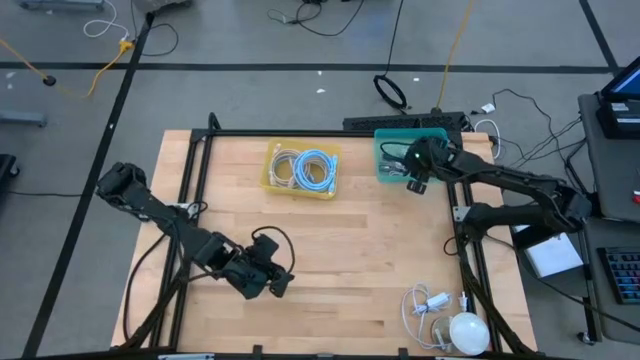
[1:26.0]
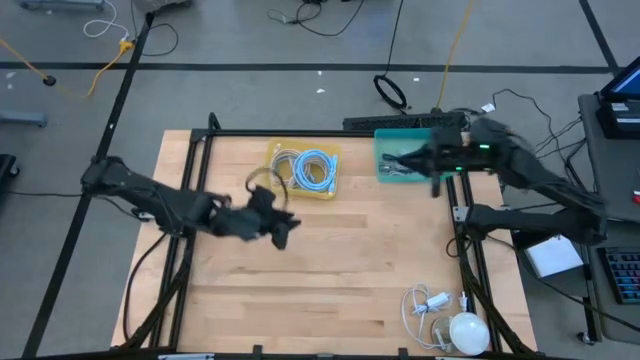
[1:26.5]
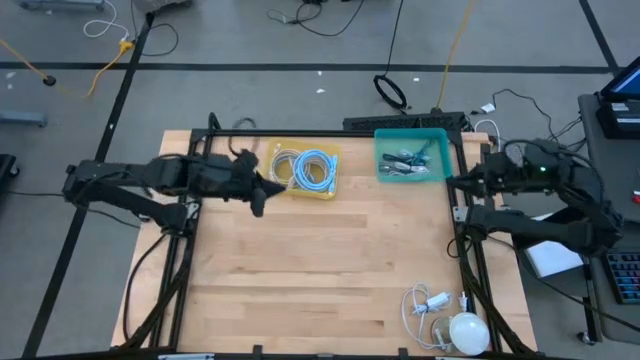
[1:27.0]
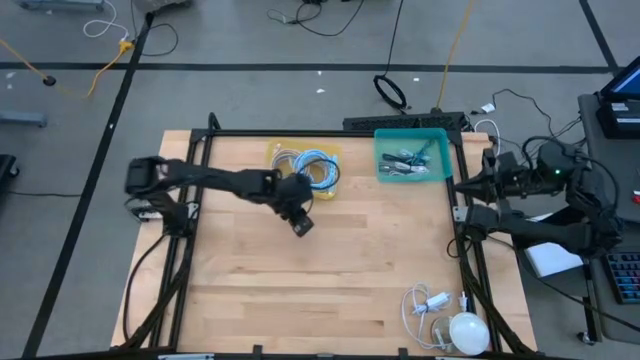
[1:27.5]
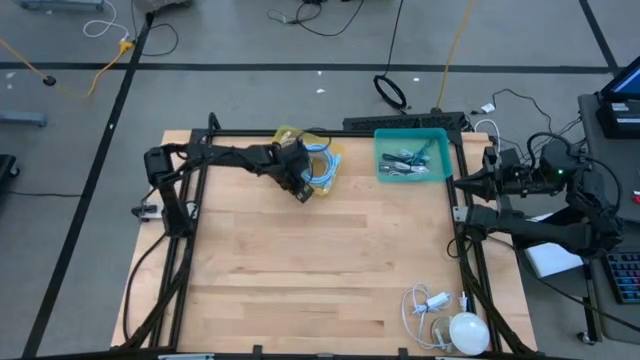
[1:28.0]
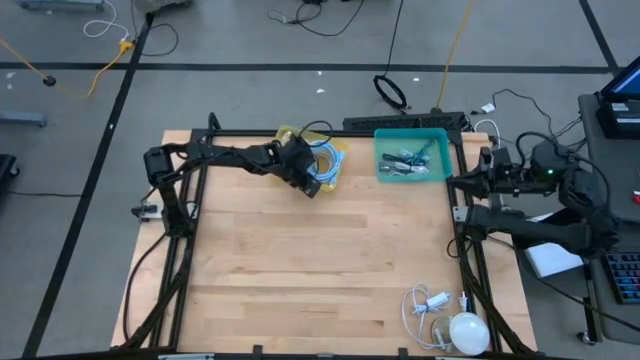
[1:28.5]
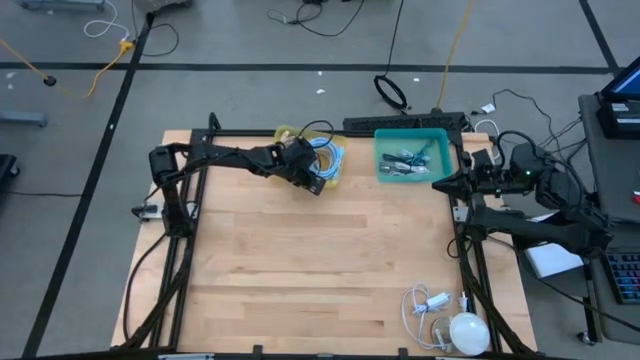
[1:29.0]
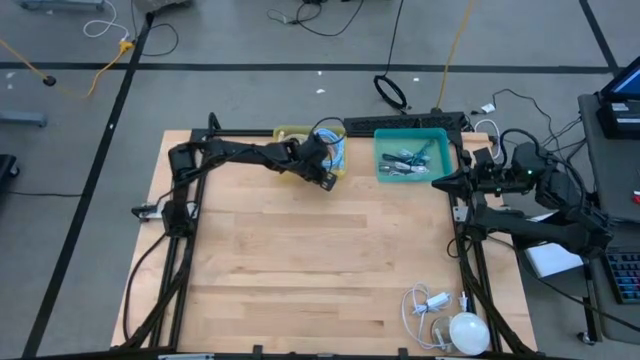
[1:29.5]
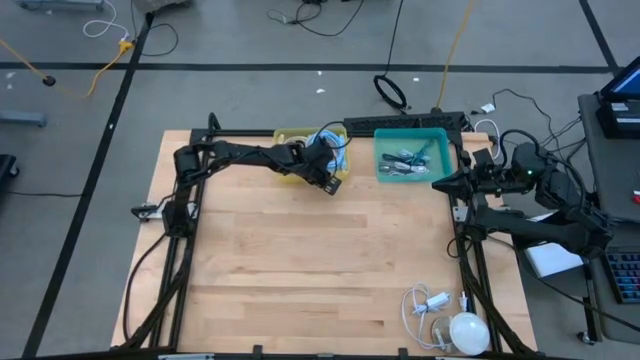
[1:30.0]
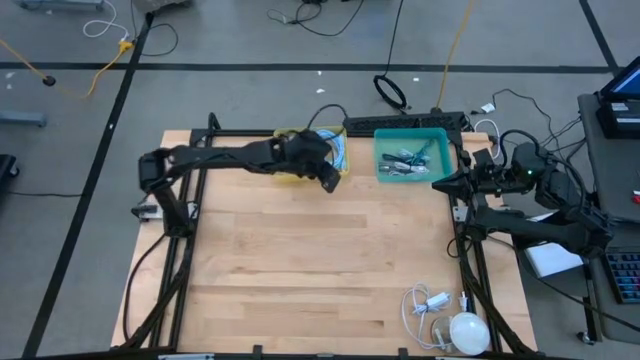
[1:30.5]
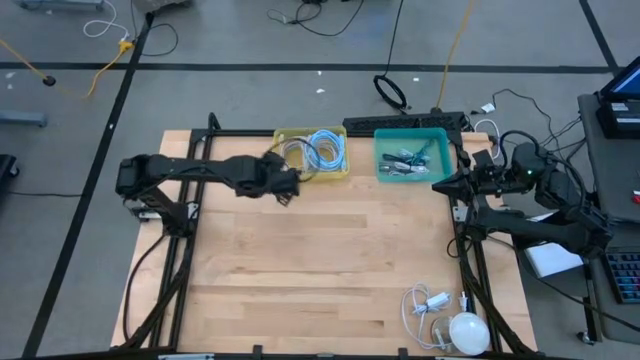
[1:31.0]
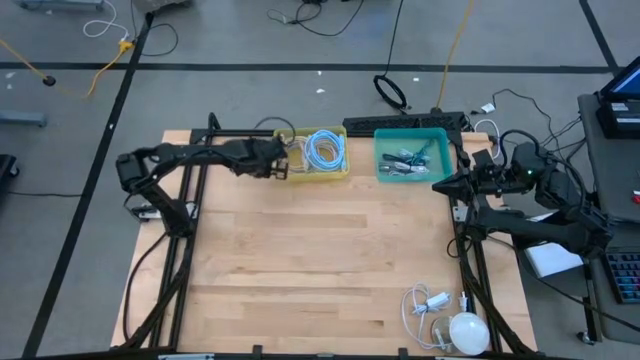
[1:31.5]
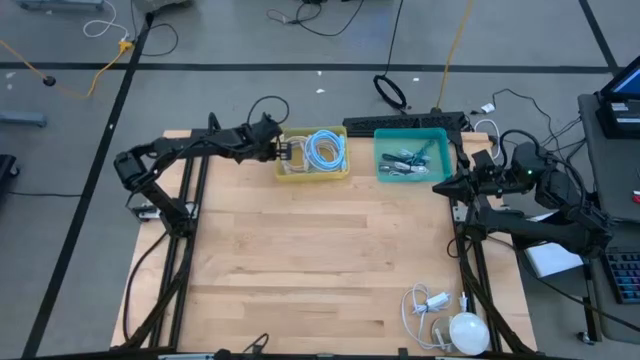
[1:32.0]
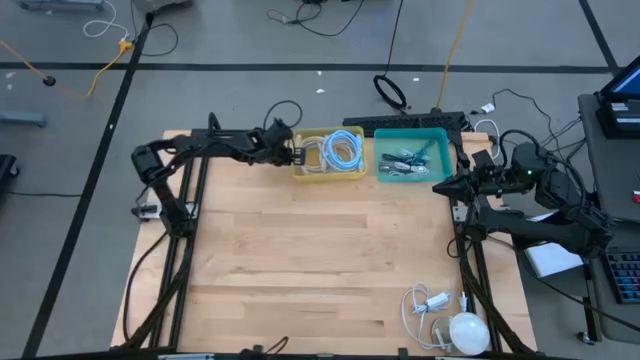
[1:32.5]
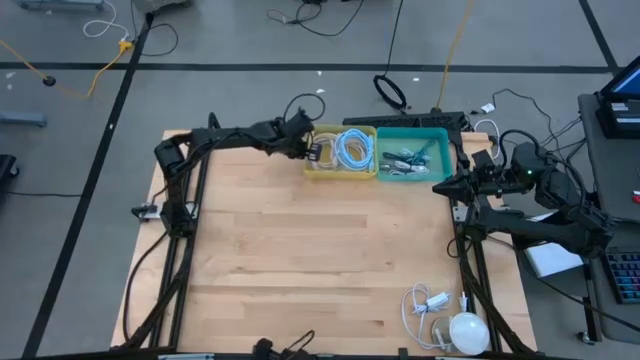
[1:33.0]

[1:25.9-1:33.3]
Task: Pick & Place USB Port
Adjust the yellow bin

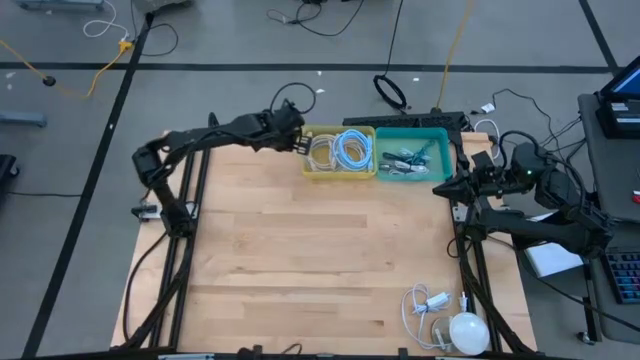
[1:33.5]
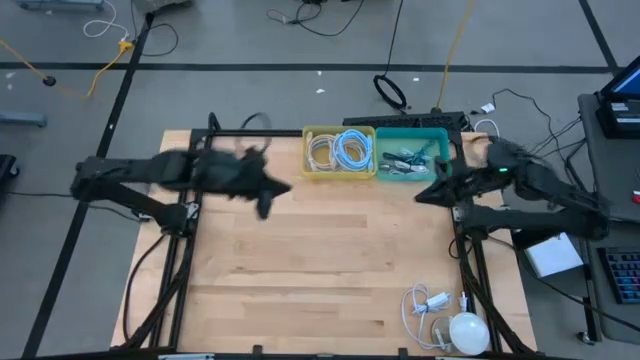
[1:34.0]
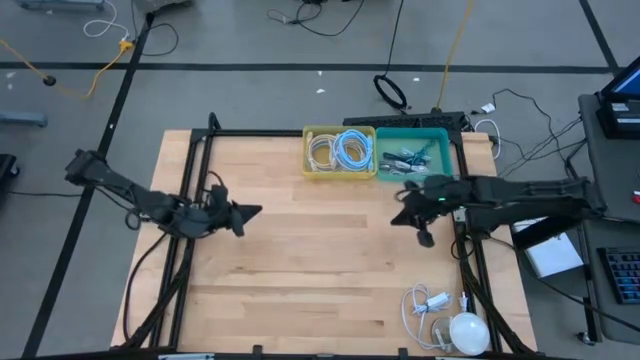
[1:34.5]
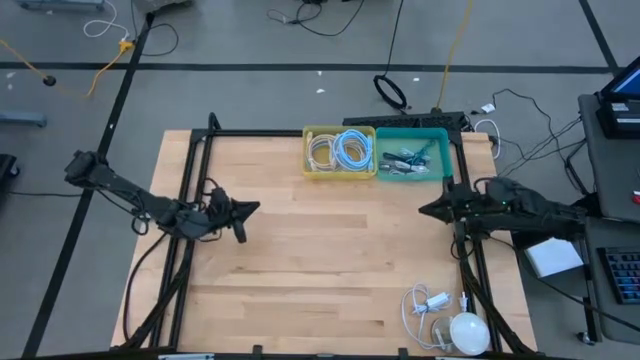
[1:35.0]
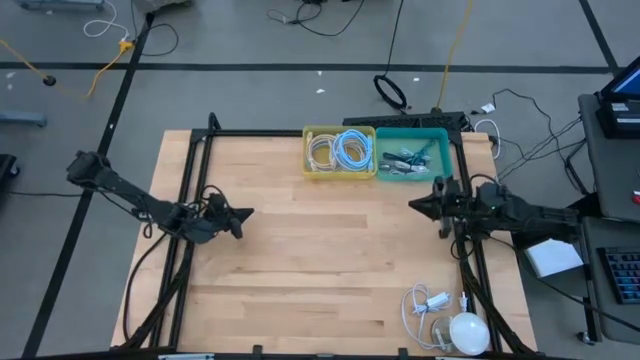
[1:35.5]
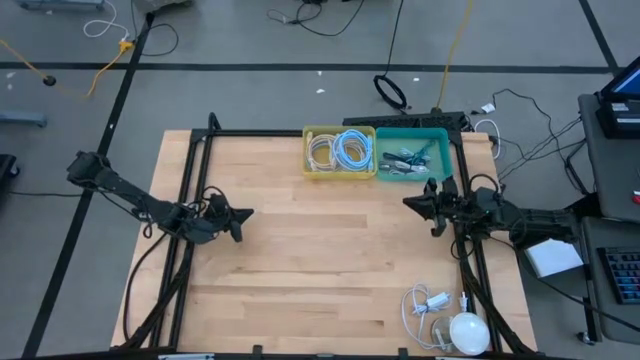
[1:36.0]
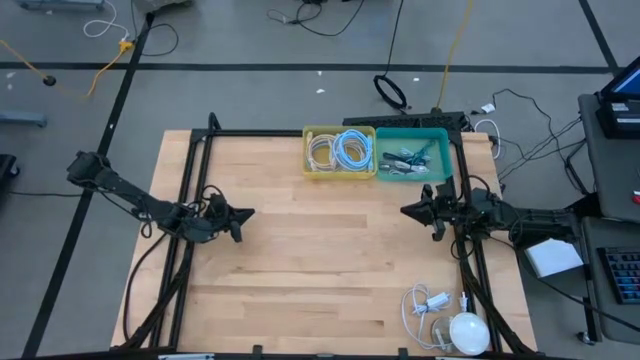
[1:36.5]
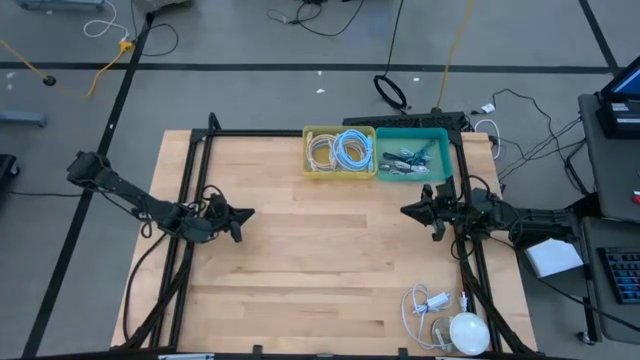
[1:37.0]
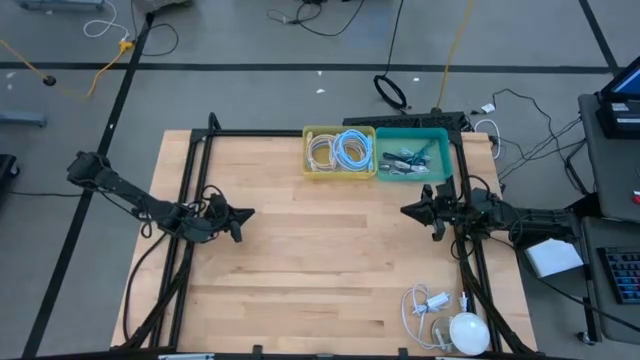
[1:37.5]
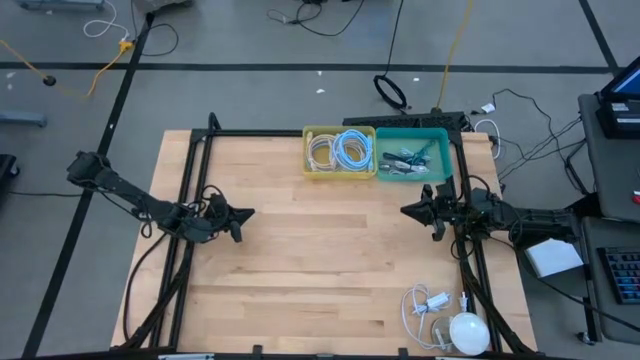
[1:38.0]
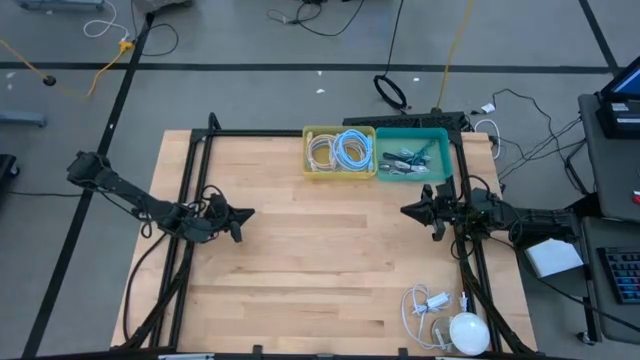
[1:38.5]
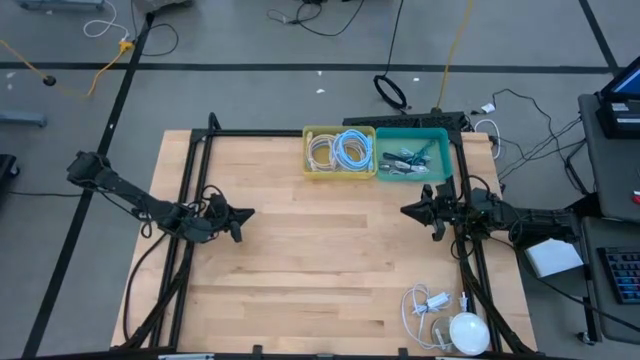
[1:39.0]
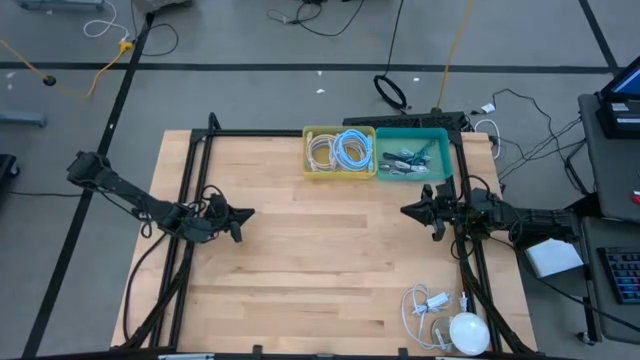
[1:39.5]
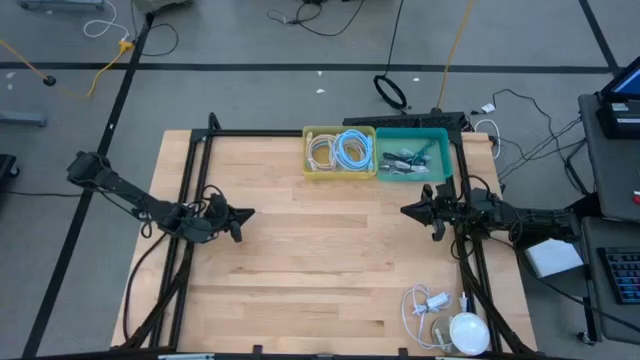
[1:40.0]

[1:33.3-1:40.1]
Return to Home Position

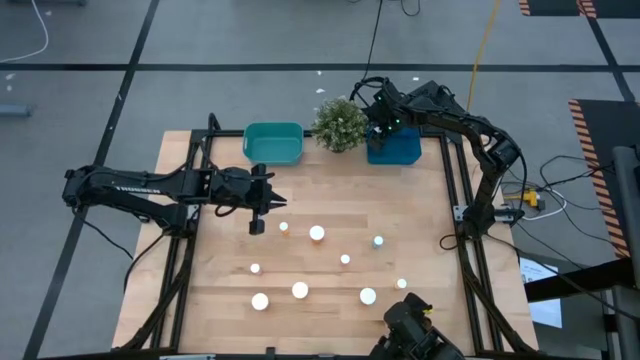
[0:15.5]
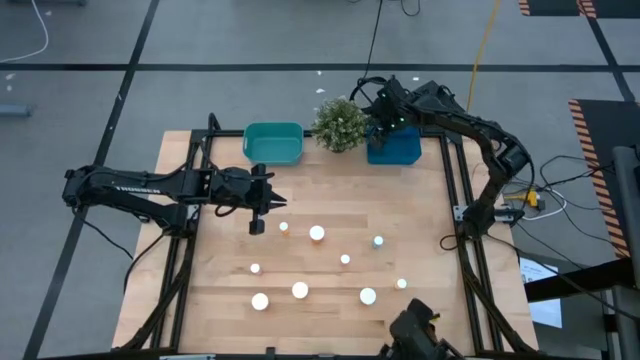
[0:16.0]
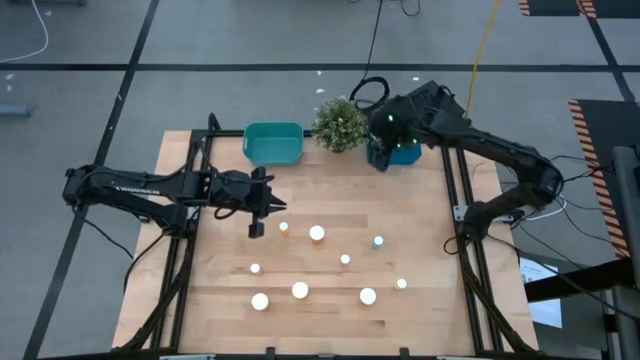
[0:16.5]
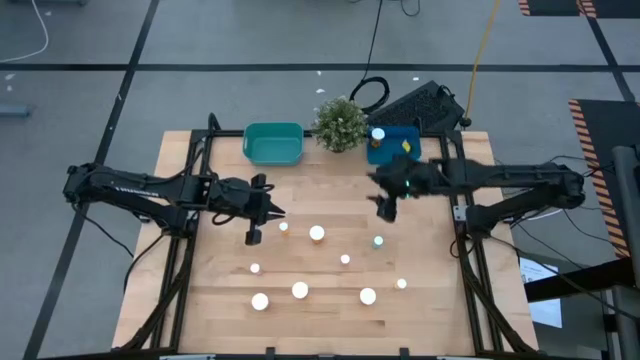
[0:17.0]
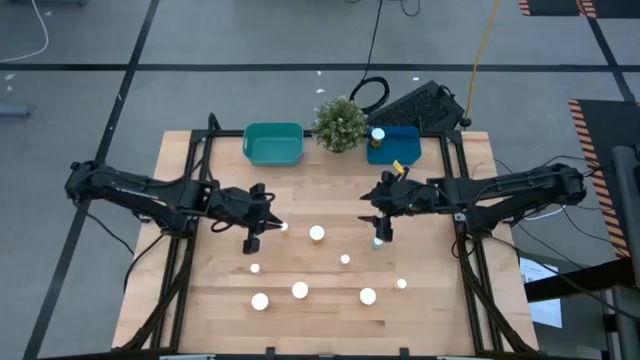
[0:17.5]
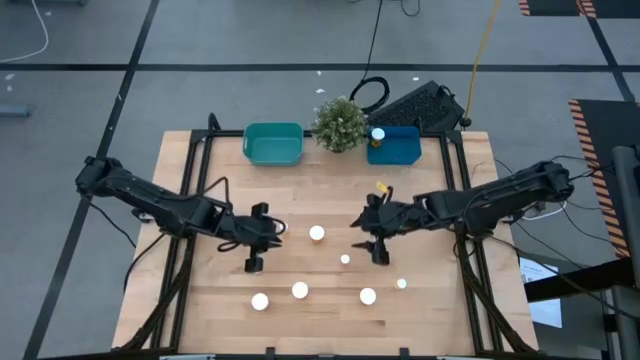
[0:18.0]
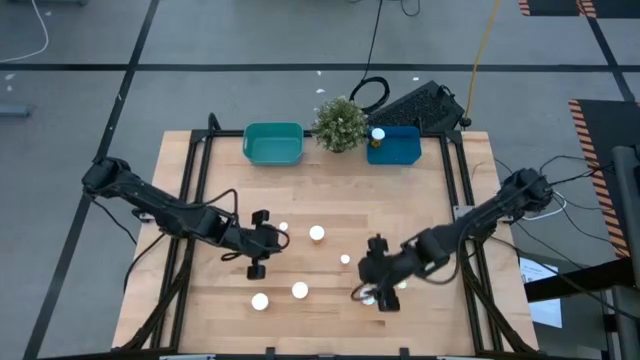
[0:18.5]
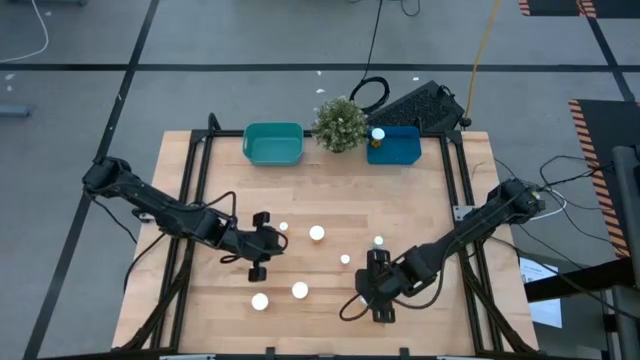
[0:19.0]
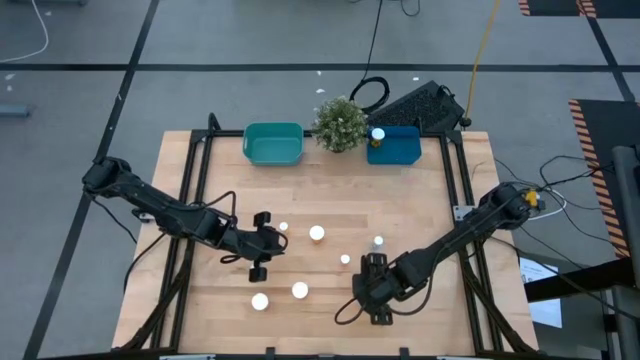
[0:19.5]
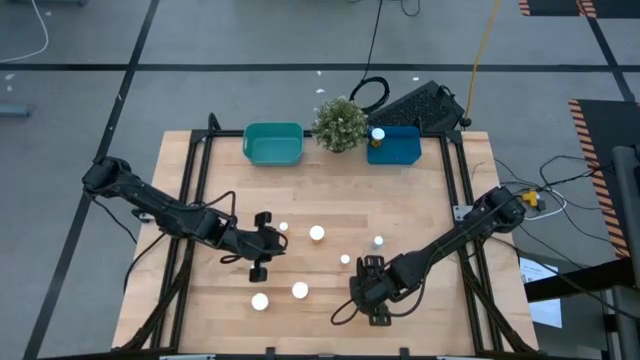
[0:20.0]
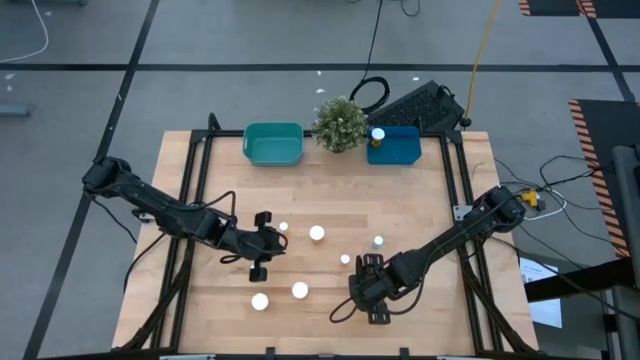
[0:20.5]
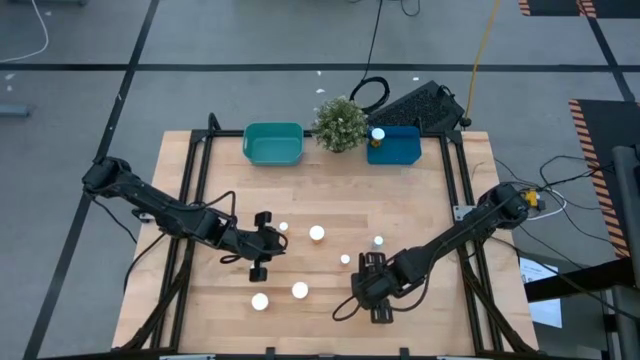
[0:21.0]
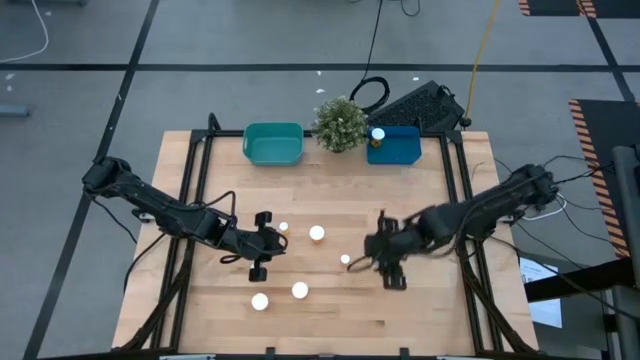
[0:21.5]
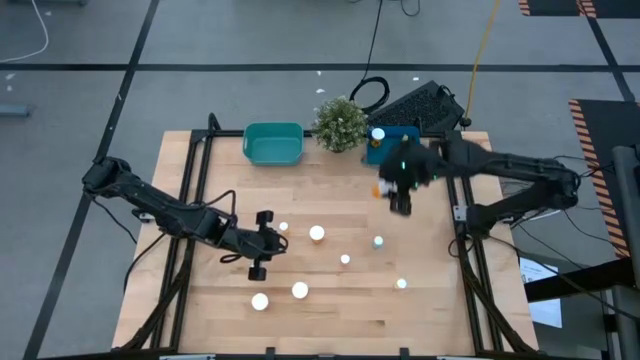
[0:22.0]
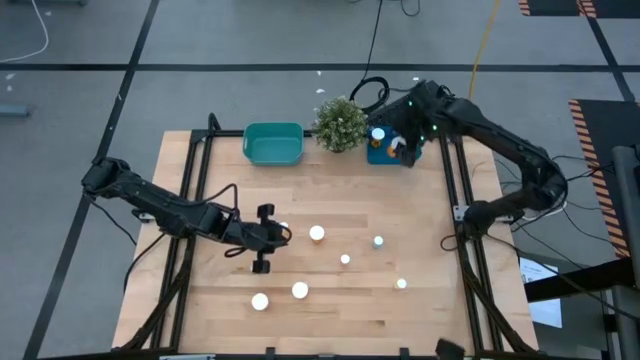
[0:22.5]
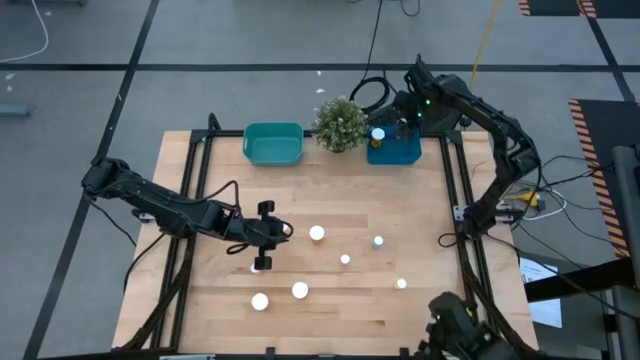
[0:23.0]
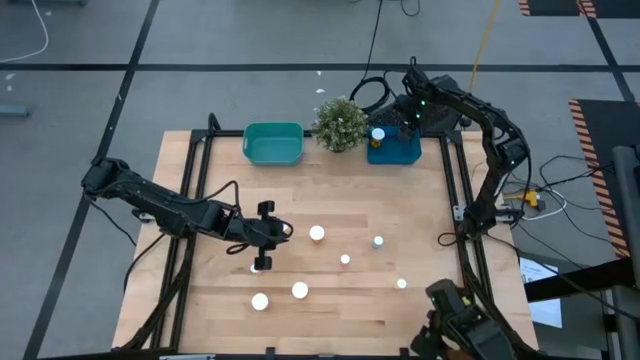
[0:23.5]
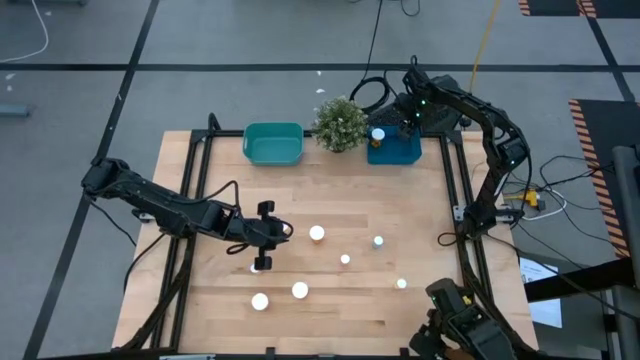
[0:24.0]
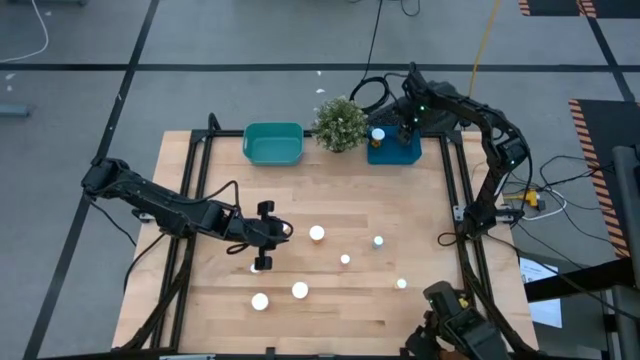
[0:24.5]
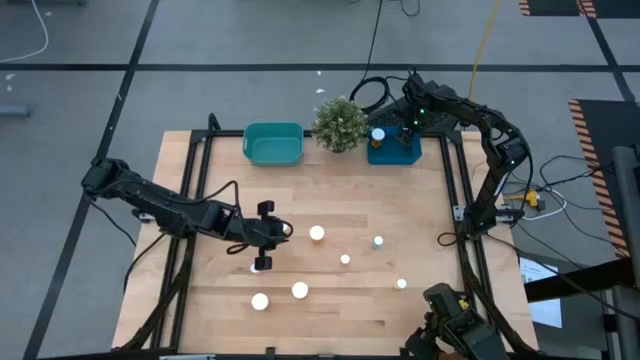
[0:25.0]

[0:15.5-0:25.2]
Task: Pick and place medicine bottles into bin by pill shape (circle, oval)
Put the large orange pill bottle into the blue bin
